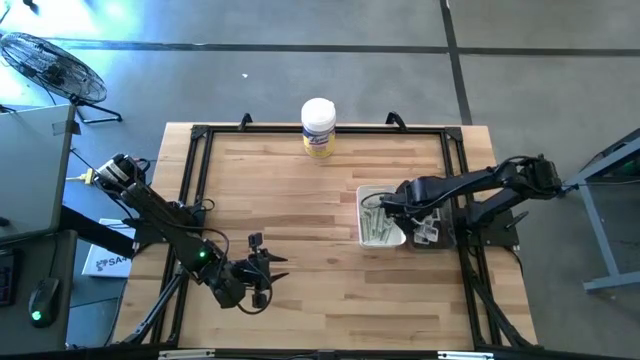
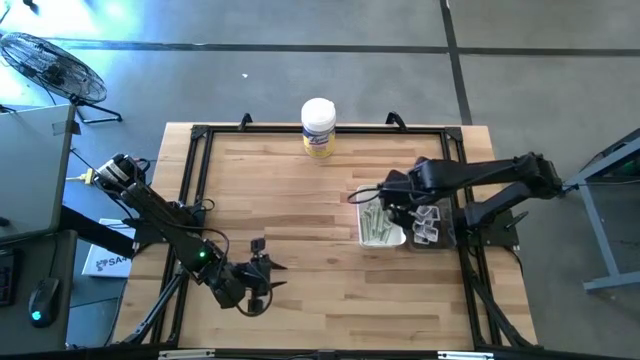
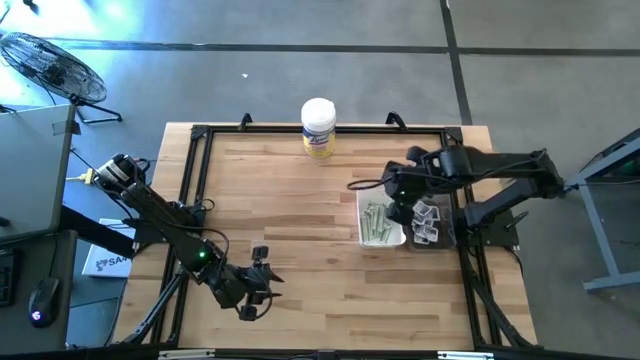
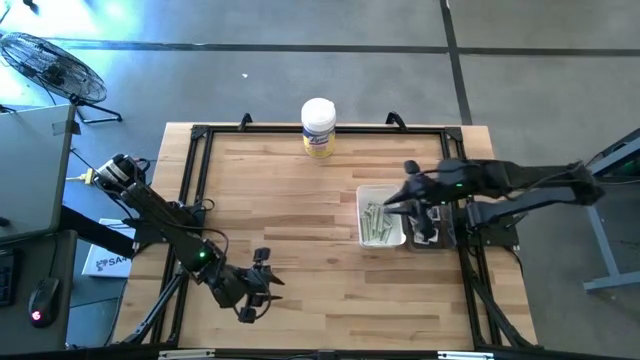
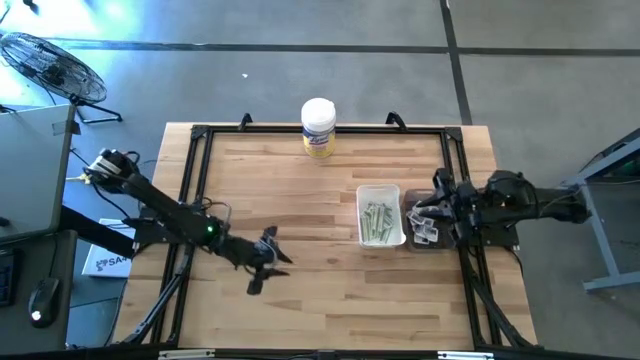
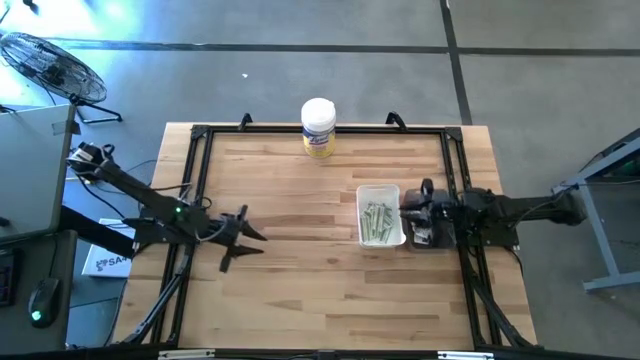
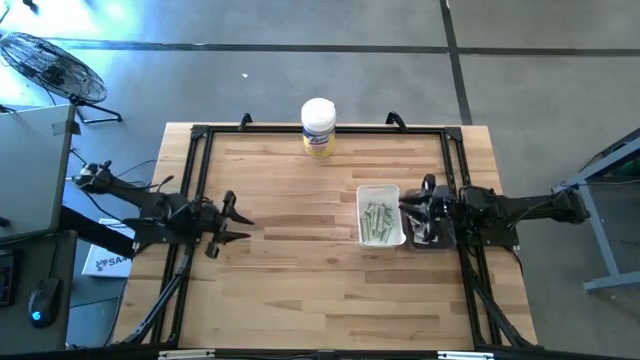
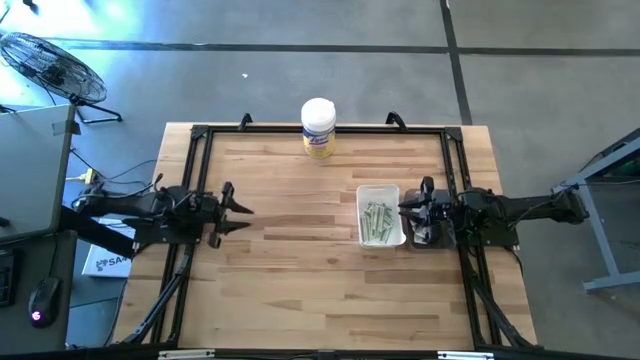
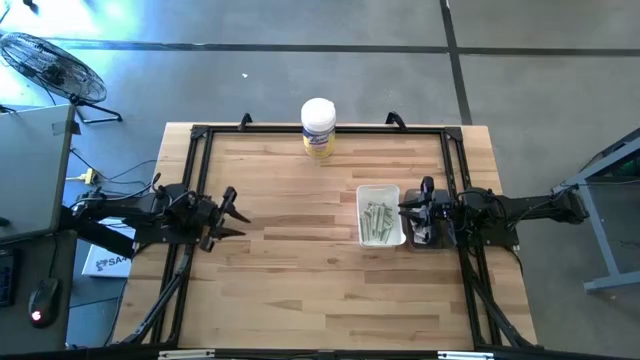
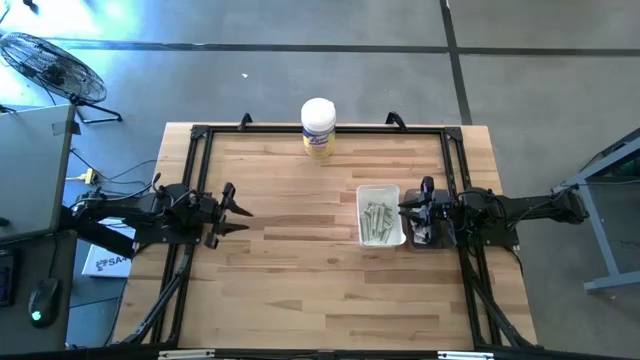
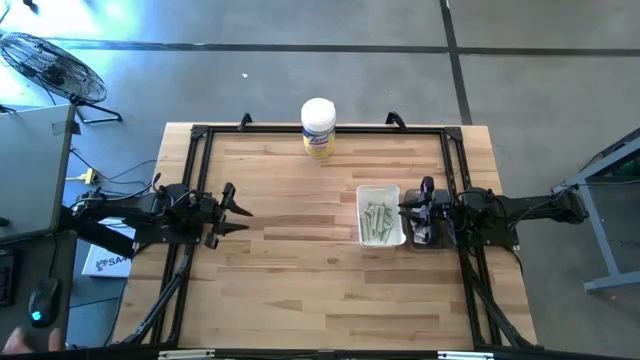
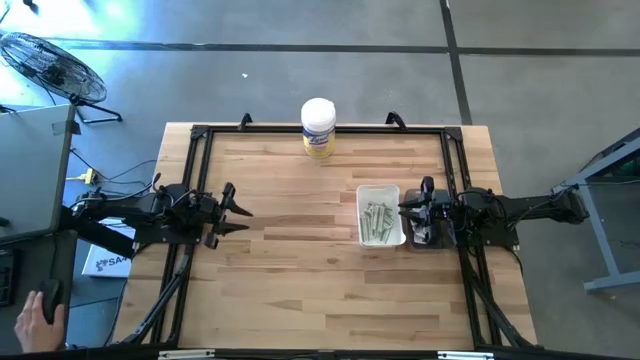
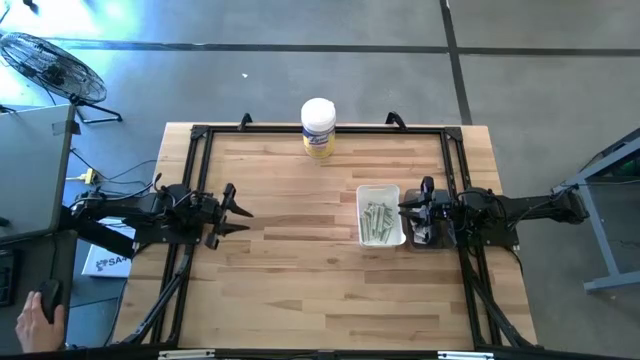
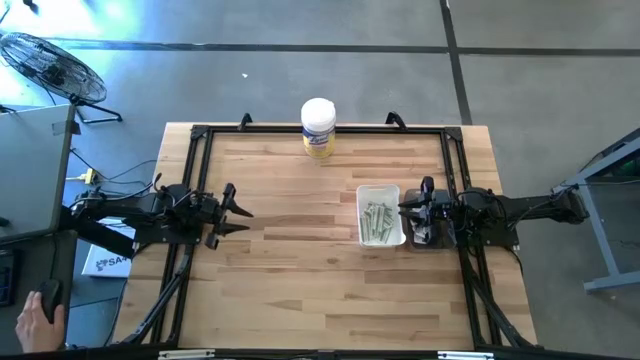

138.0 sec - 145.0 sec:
Task: Pick & Place First Aid Supplies
Return to Home Position

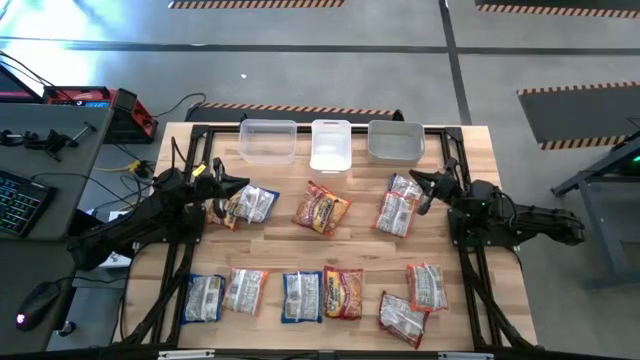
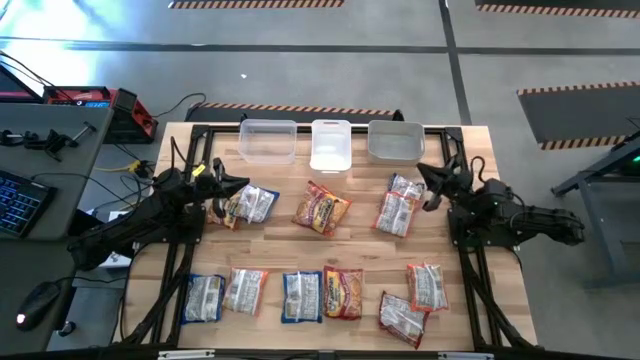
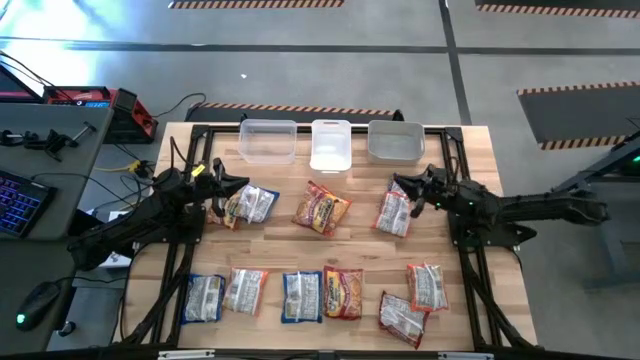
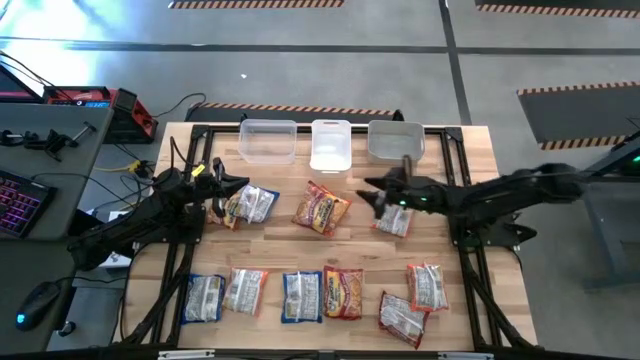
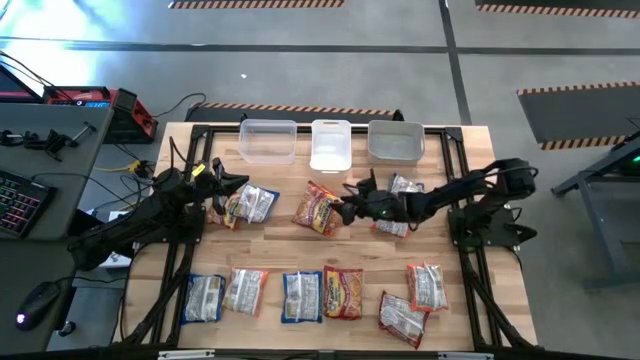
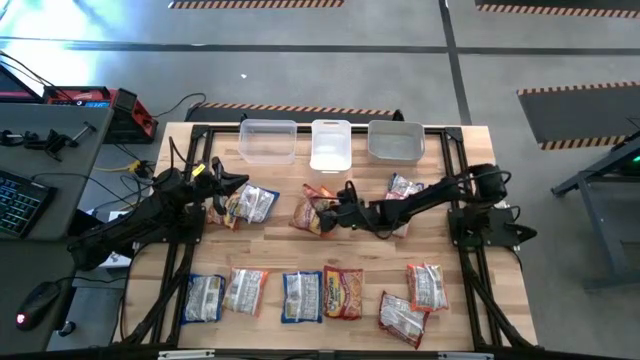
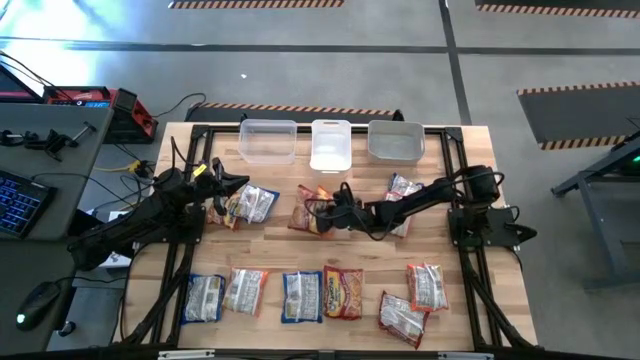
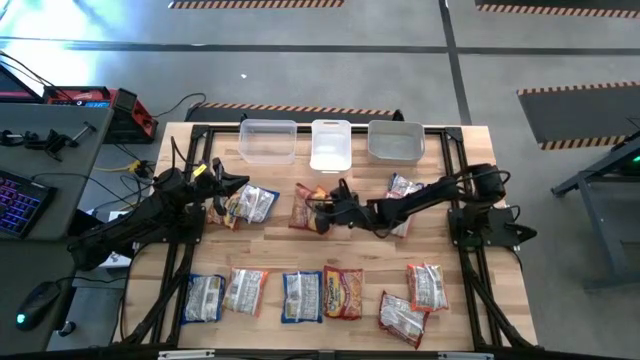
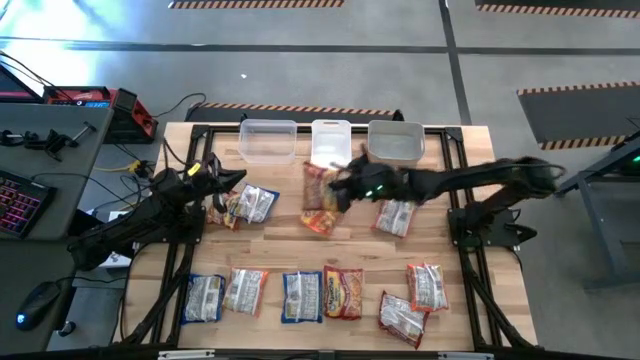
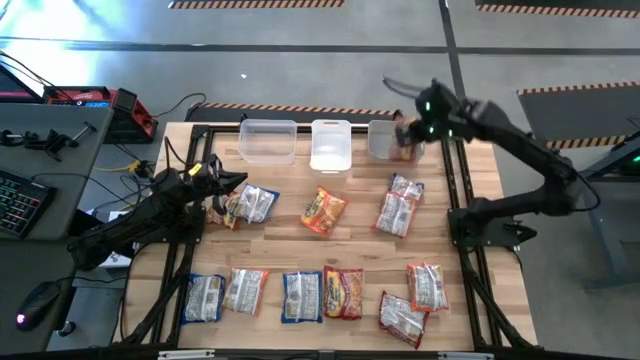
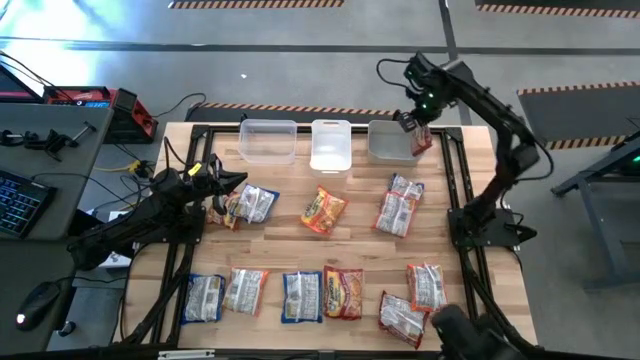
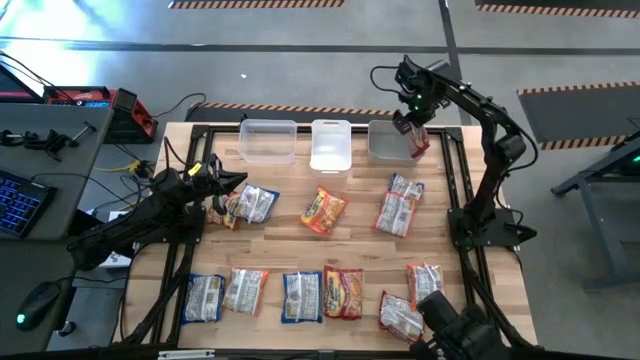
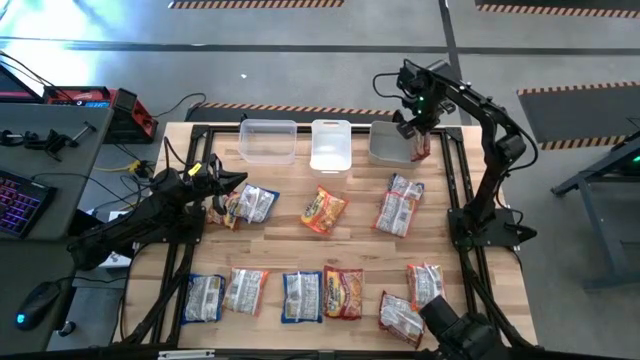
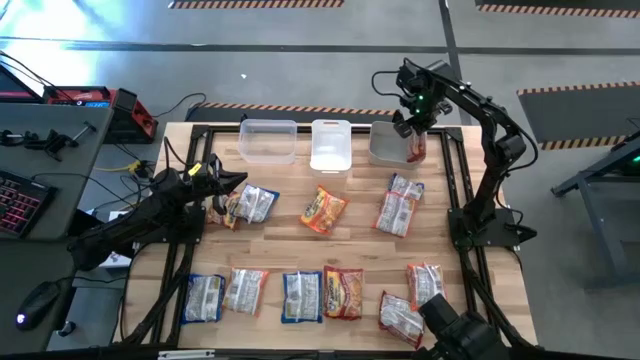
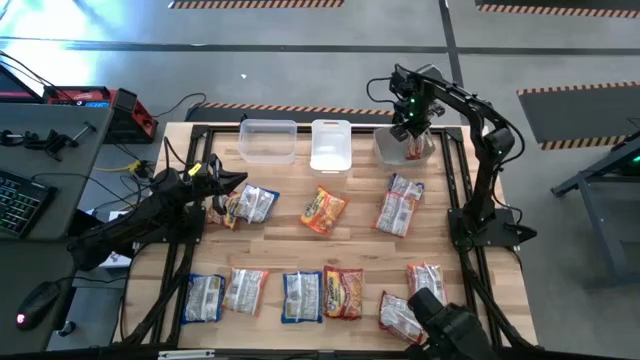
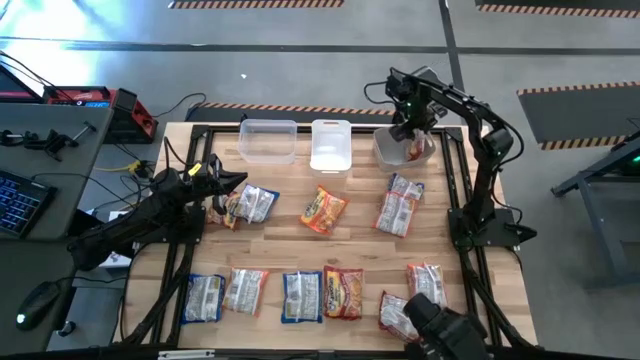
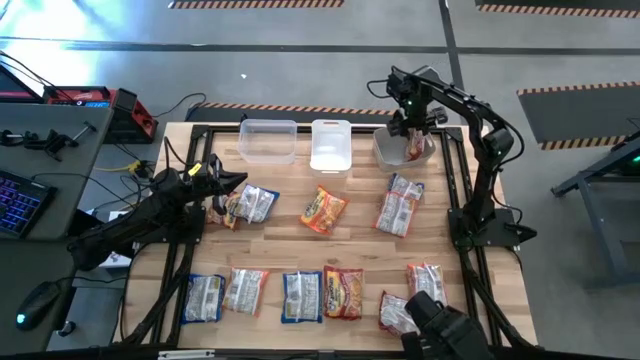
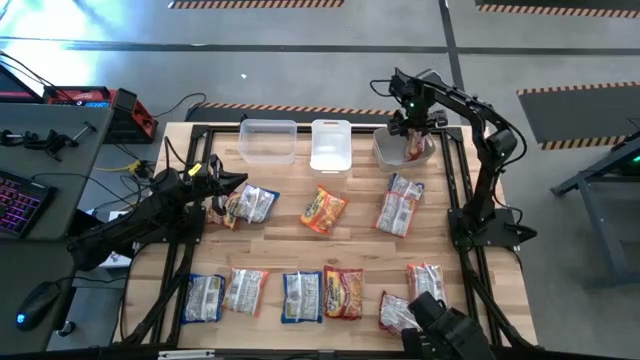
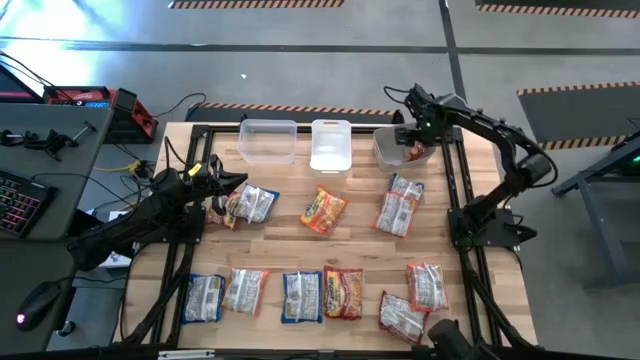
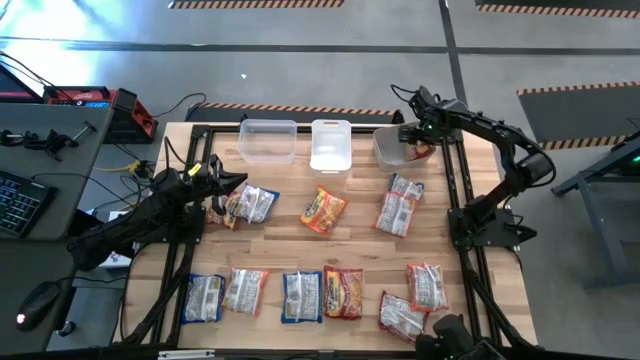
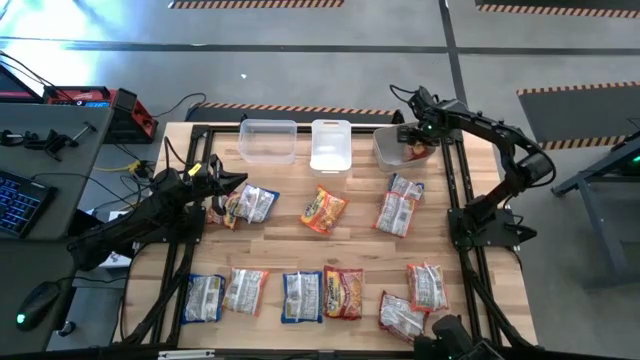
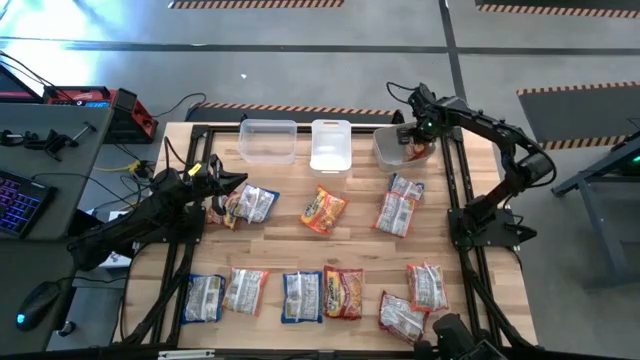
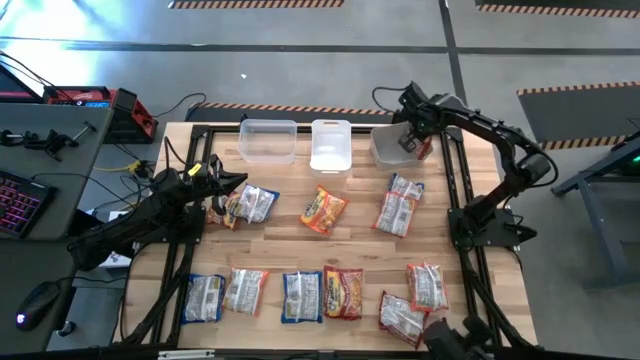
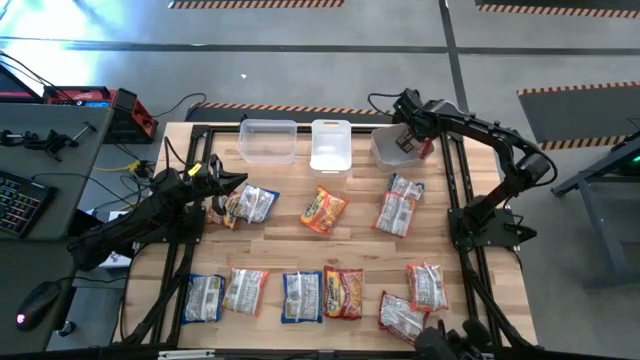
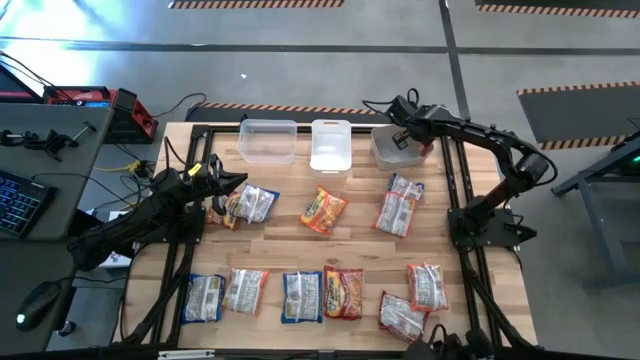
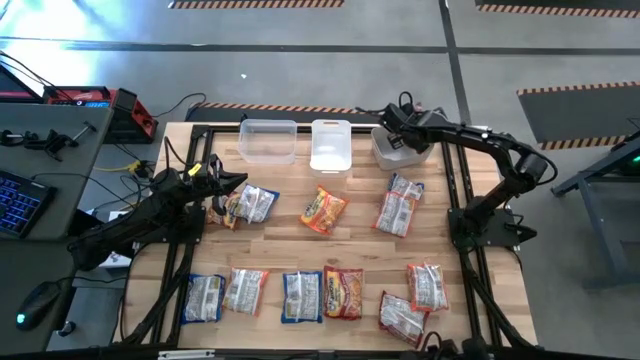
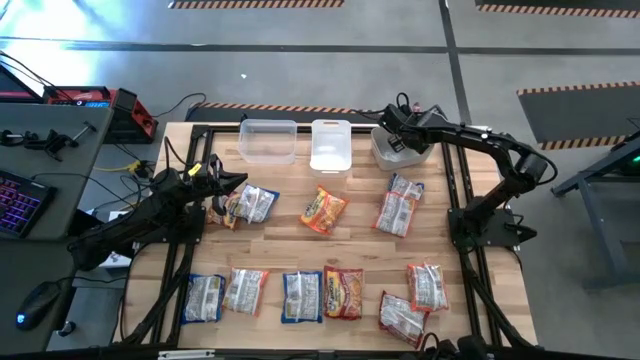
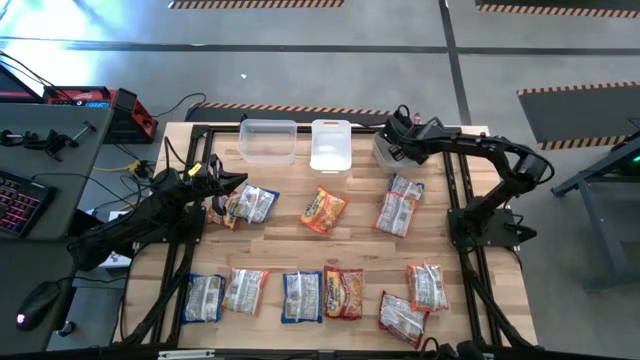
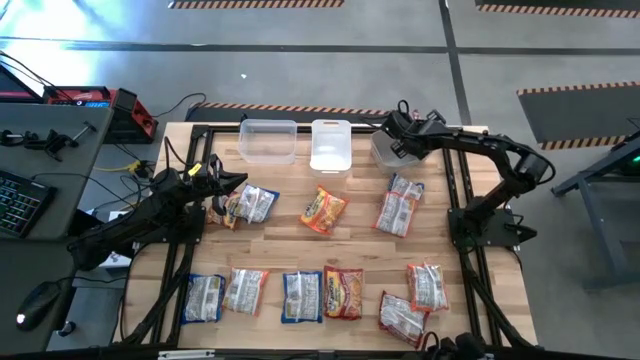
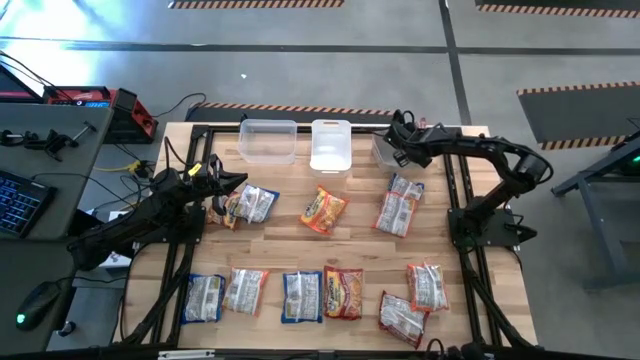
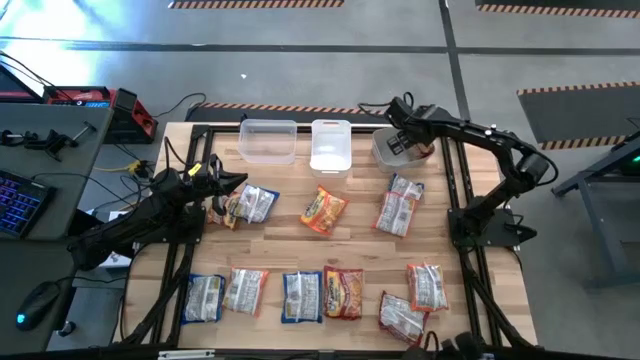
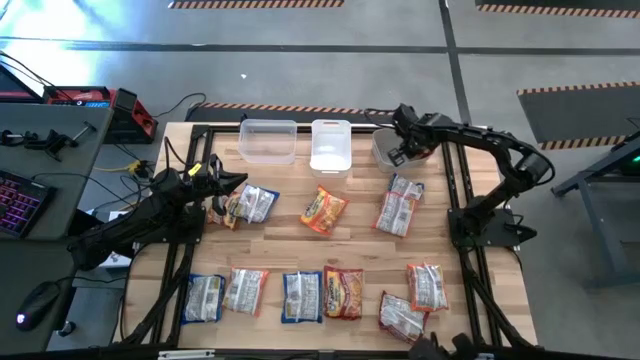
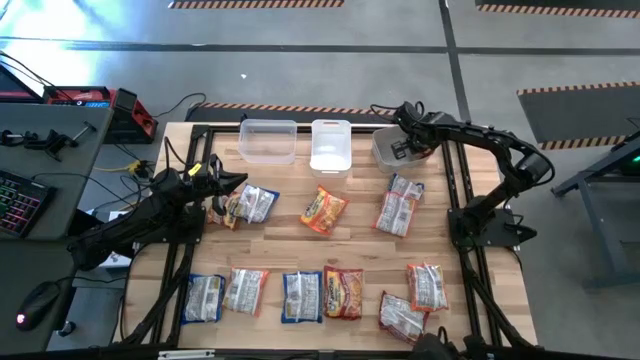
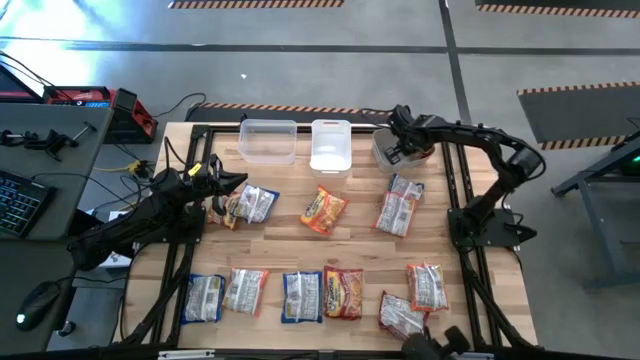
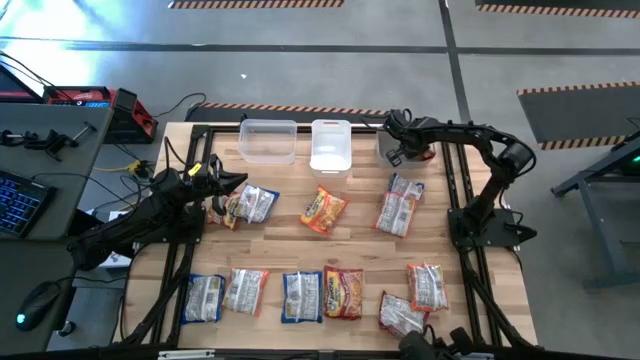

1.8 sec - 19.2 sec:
Task: Sort Maruchan noodles
Put the red noodle pack into the gray bin
